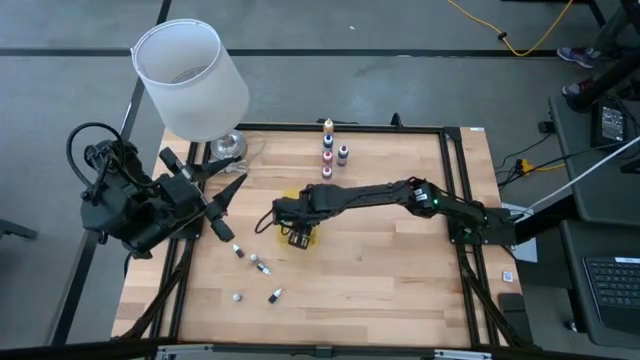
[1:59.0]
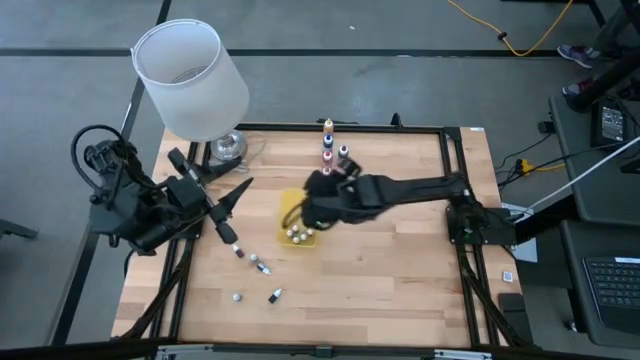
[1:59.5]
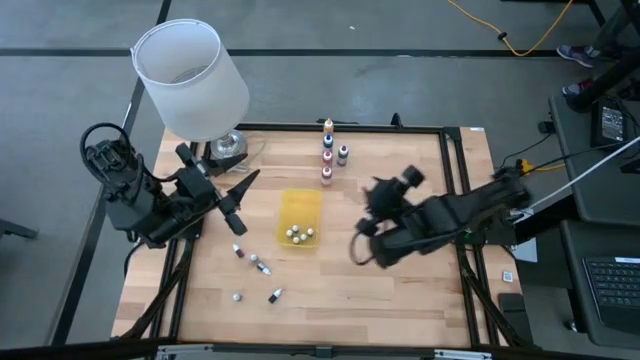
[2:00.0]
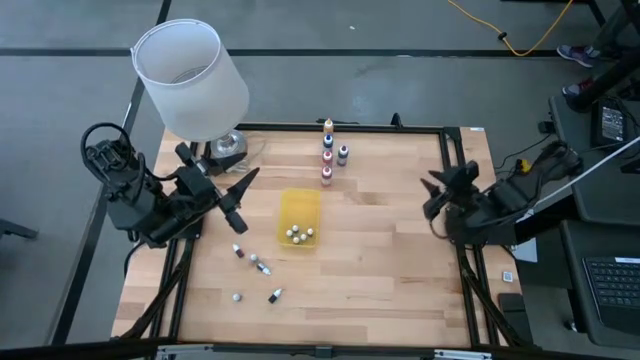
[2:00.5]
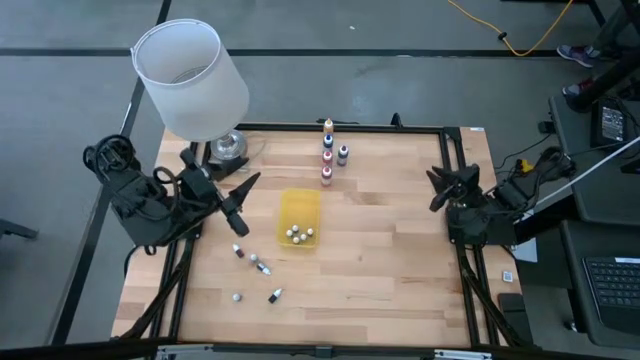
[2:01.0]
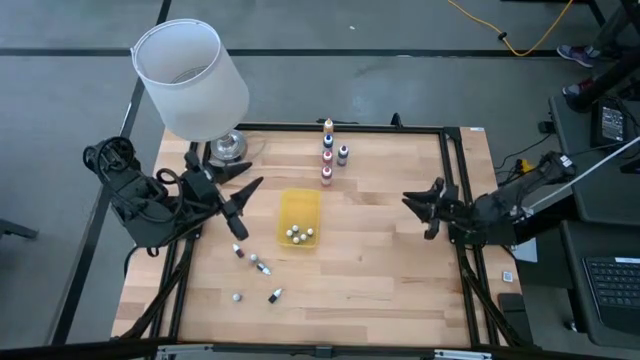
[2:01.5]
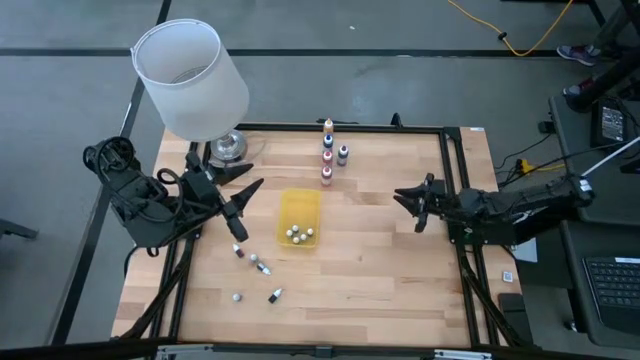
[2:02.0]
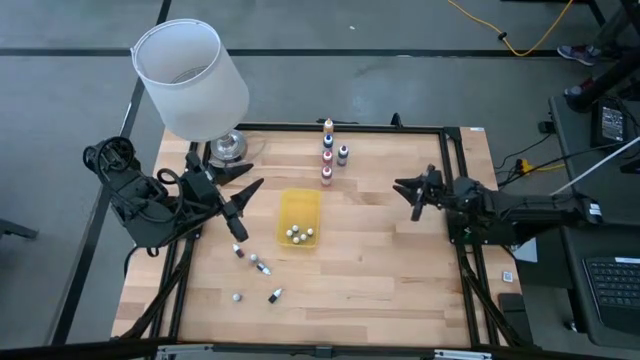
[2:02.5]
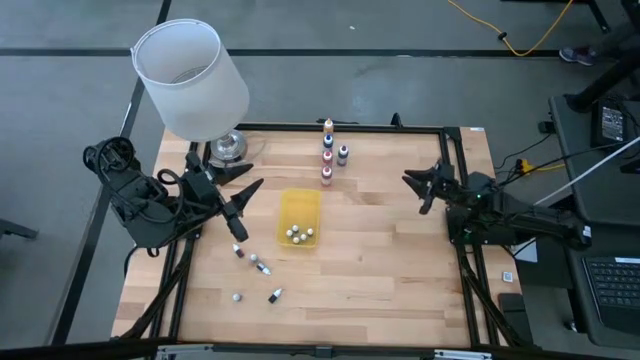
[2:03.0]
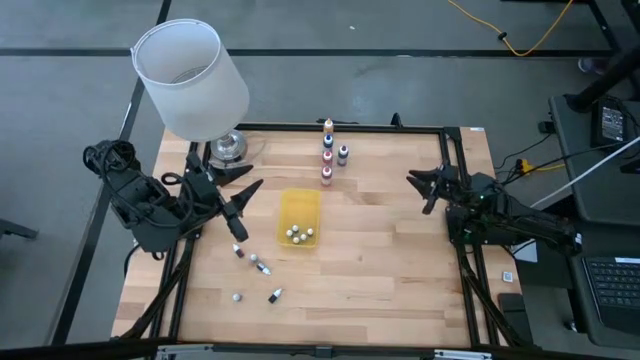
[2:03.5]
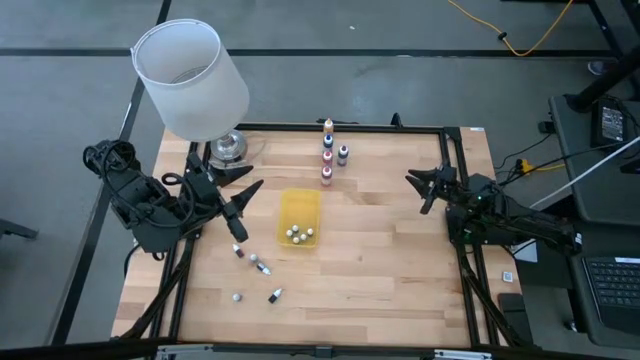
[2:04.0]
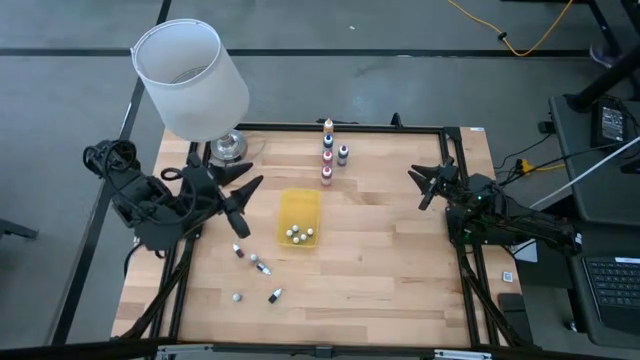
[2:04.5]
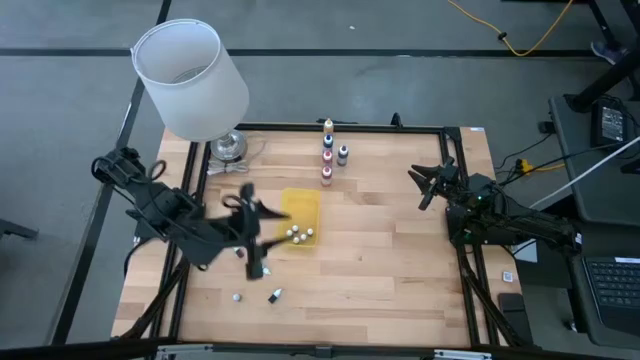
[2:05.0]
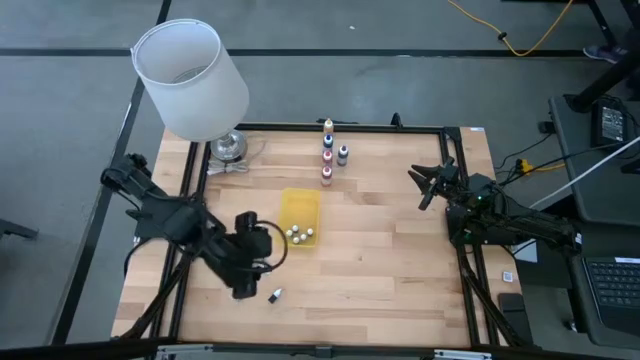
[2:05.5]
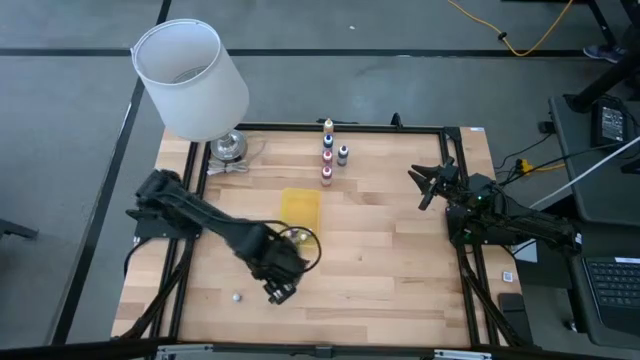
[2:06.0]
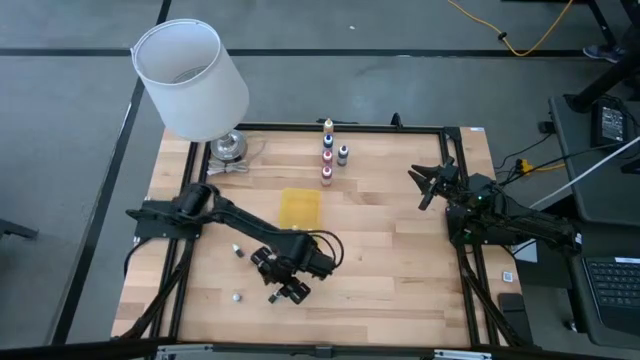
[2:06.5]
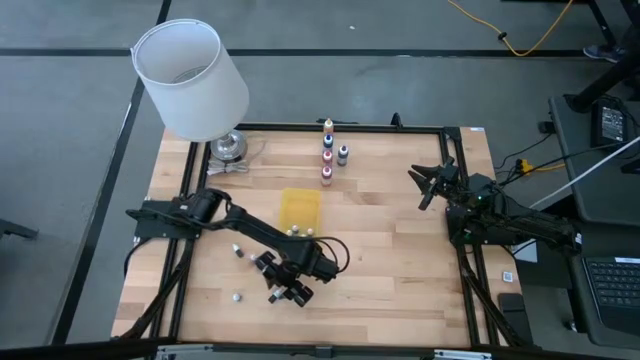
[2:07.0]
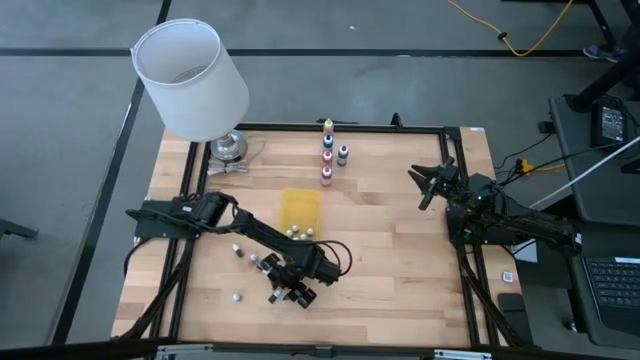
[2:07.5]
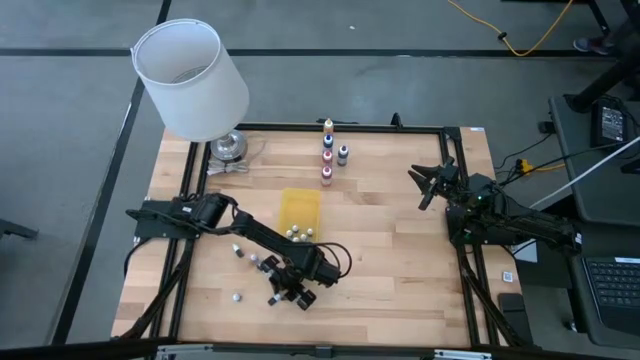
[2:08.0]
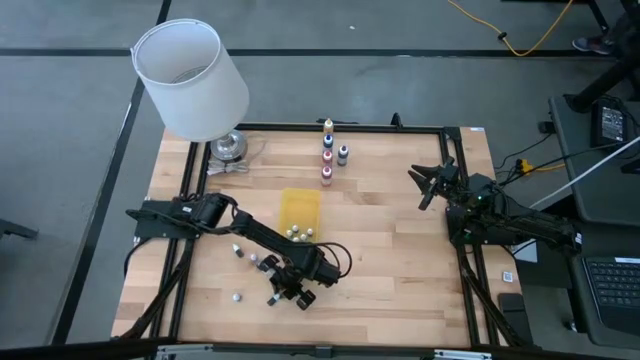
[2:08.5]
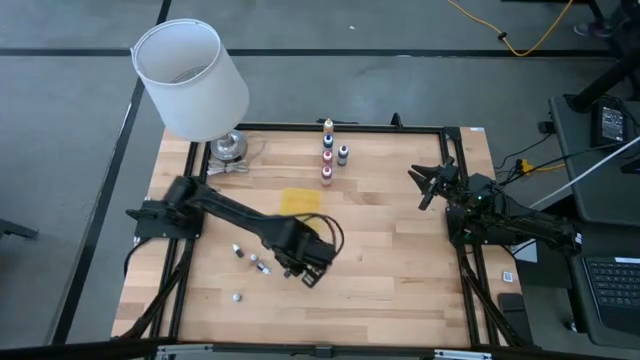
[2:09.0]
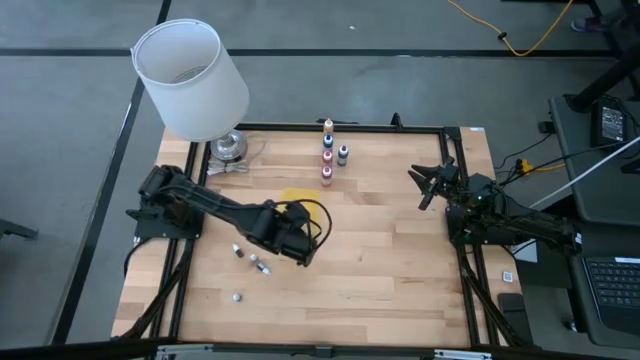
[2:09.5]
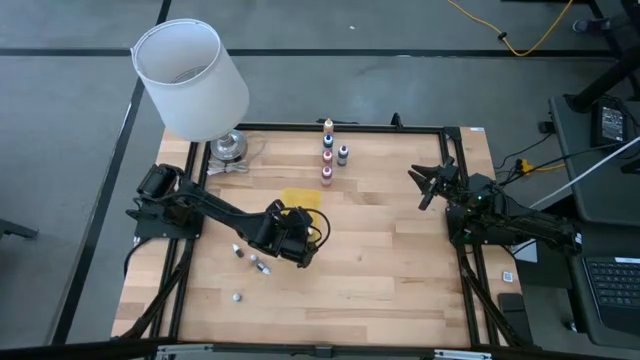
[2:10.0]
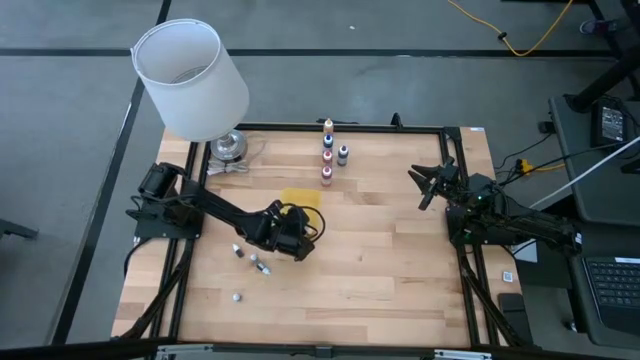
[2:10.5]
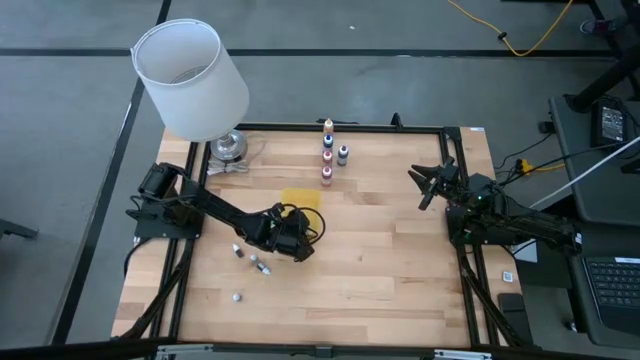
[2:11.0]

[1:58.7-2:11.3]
Task: Pick & Place food coloring
Put the small black bottle into the yellow bin

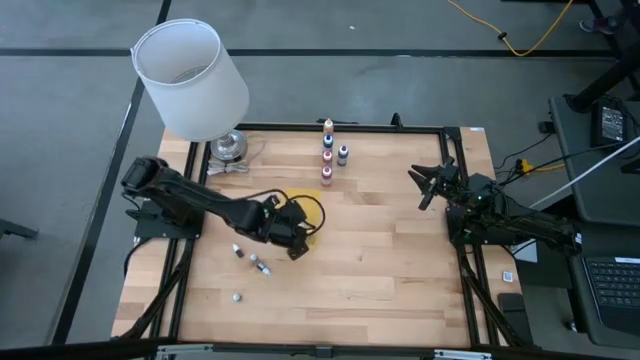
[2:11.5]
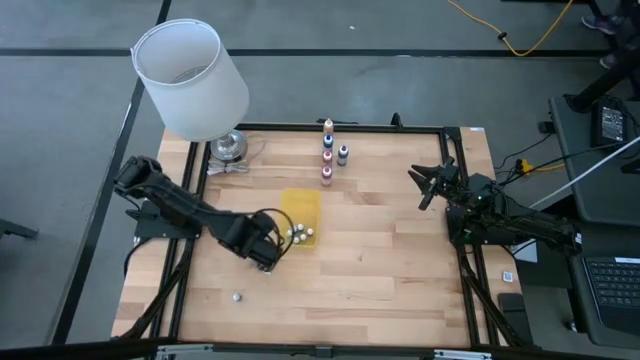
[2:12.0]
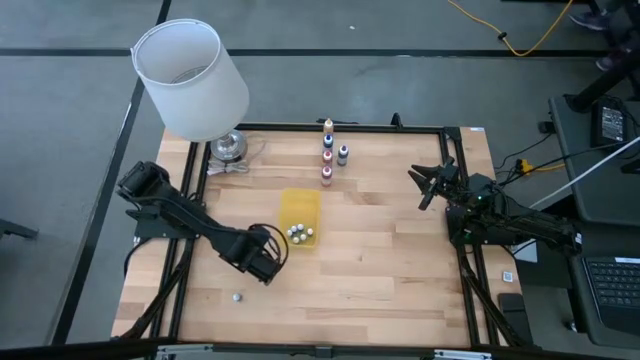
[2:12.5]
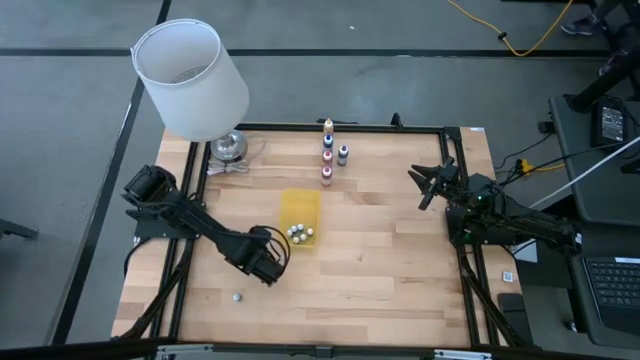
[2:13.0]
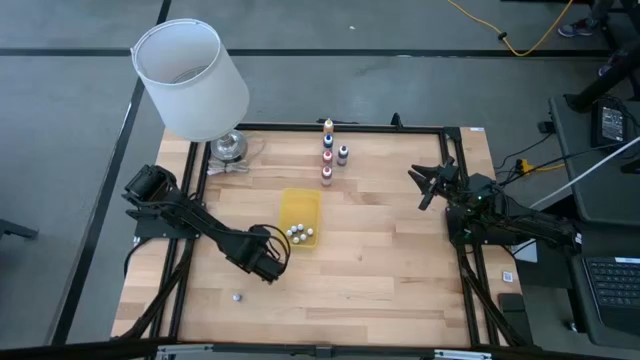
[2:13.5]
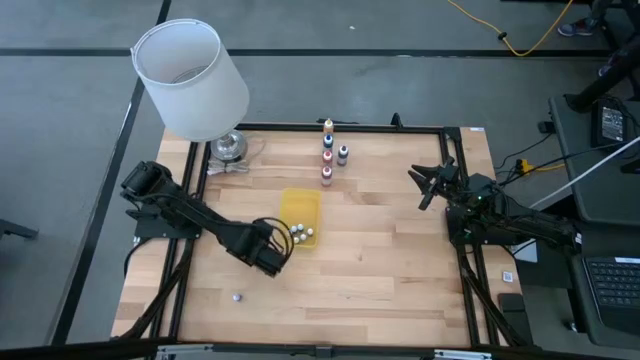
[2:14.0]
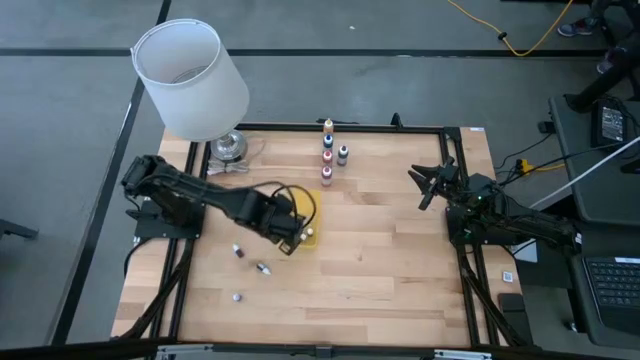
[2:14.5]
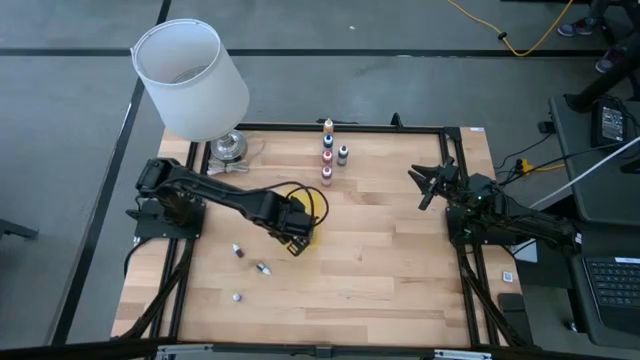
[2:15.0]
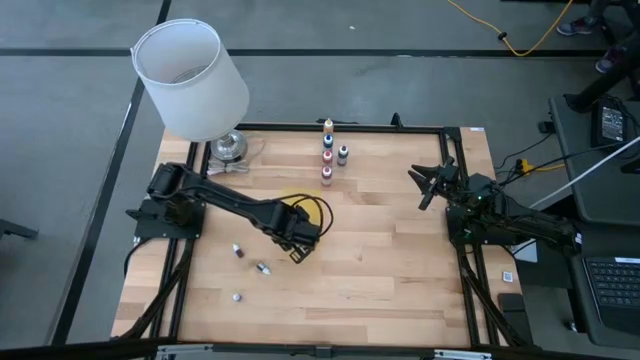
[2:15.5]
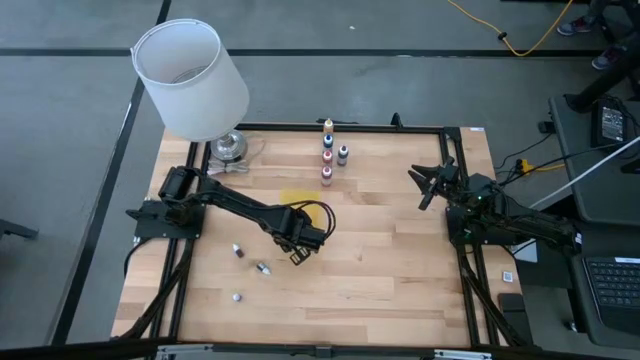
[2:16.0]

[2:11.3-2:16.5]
Put the small black bottle into the yellow bin
